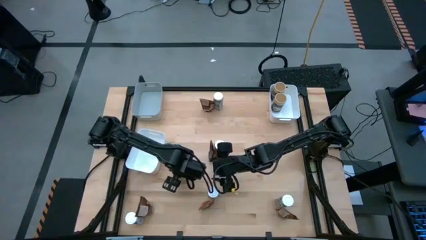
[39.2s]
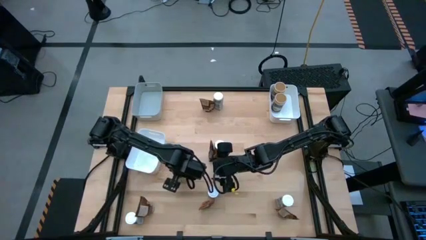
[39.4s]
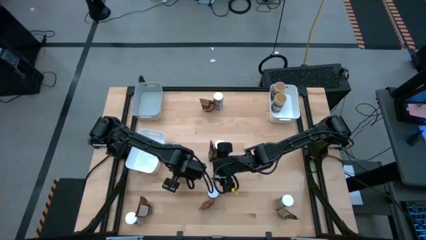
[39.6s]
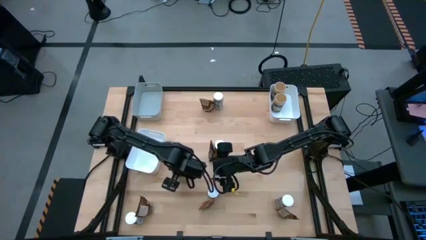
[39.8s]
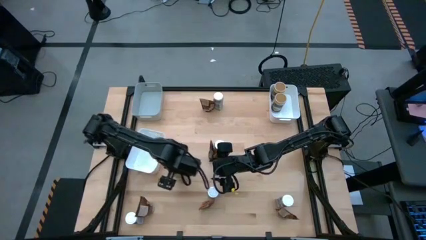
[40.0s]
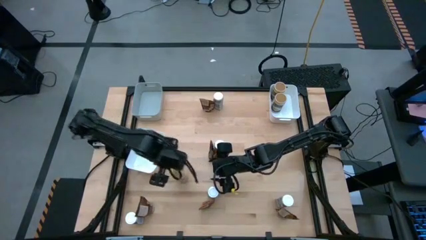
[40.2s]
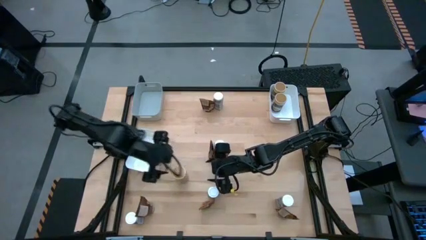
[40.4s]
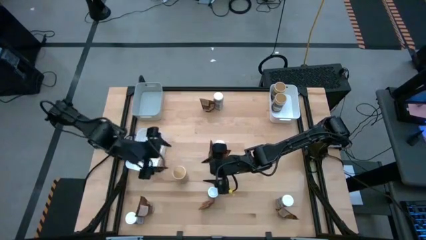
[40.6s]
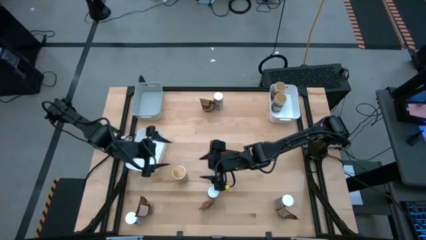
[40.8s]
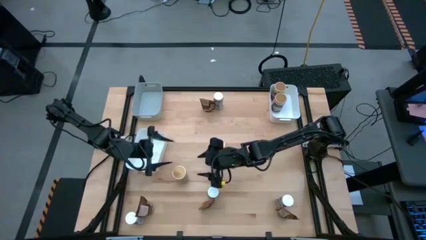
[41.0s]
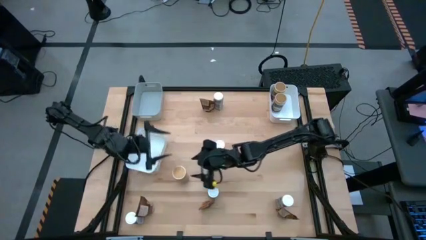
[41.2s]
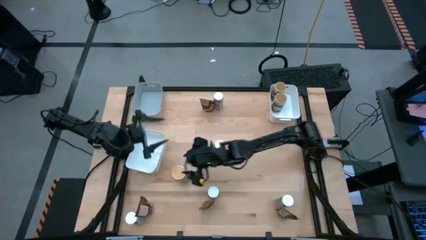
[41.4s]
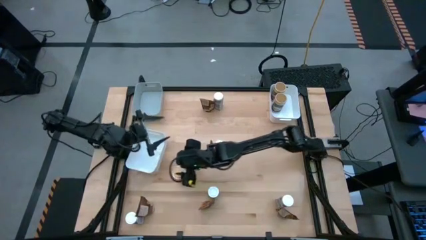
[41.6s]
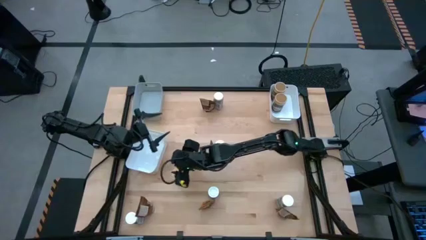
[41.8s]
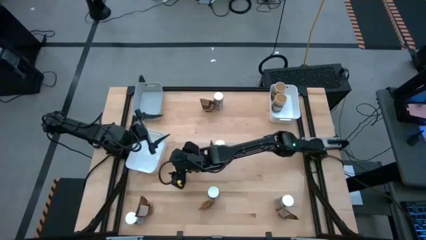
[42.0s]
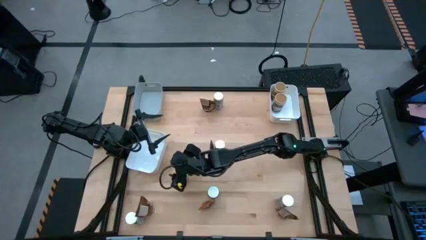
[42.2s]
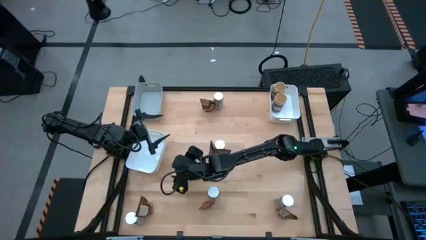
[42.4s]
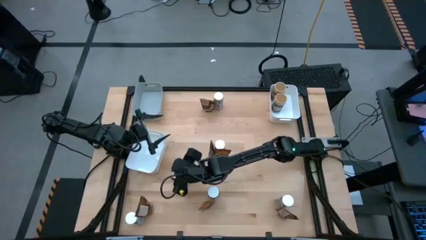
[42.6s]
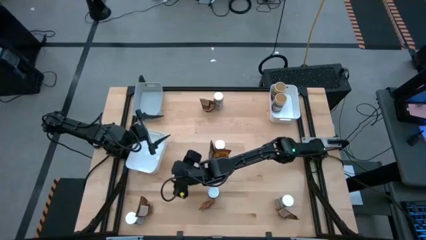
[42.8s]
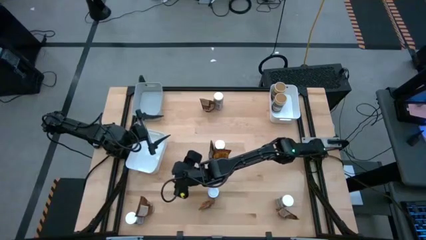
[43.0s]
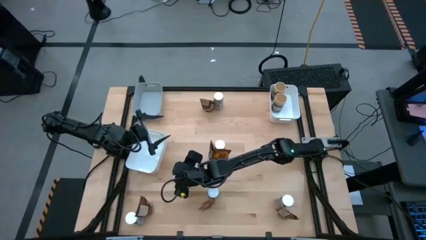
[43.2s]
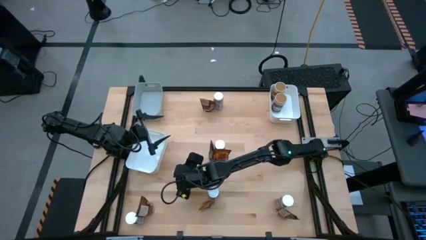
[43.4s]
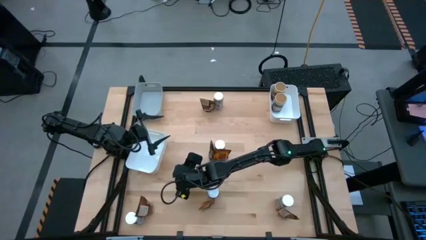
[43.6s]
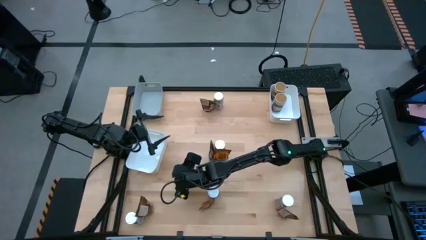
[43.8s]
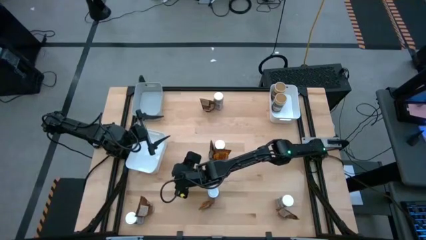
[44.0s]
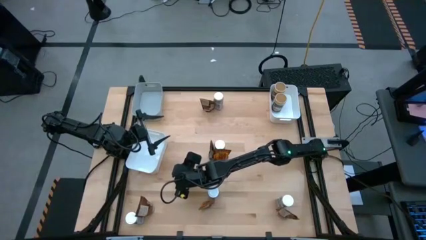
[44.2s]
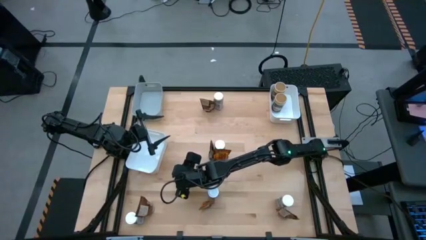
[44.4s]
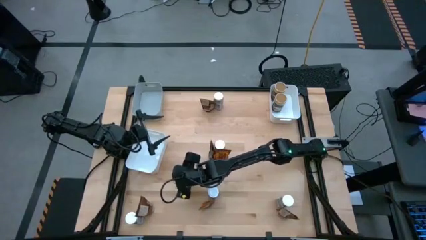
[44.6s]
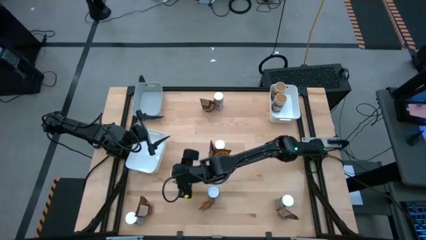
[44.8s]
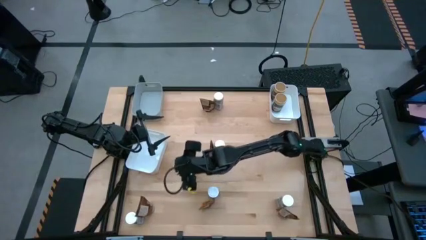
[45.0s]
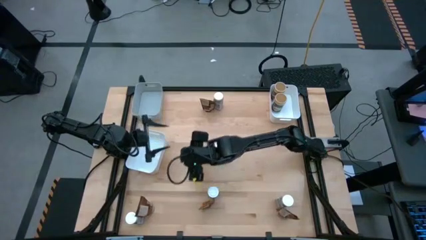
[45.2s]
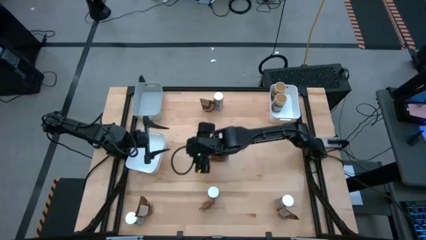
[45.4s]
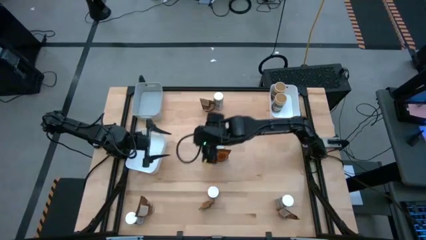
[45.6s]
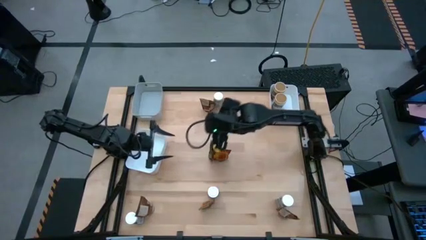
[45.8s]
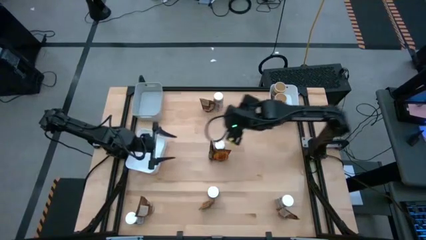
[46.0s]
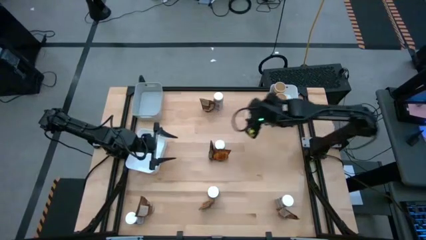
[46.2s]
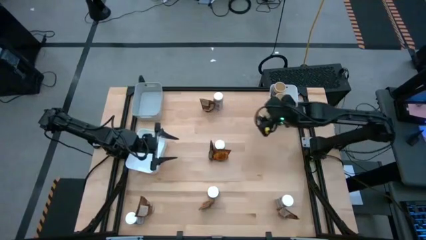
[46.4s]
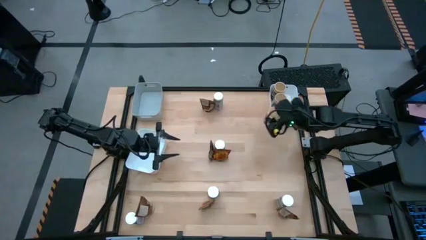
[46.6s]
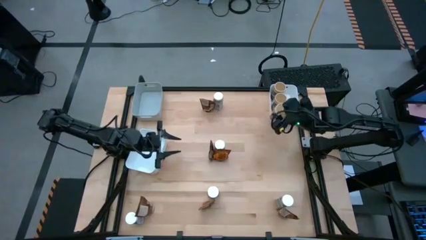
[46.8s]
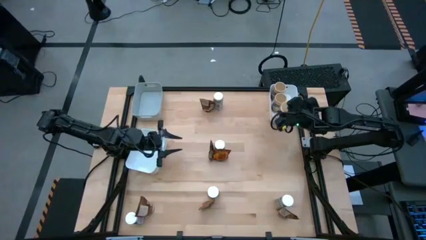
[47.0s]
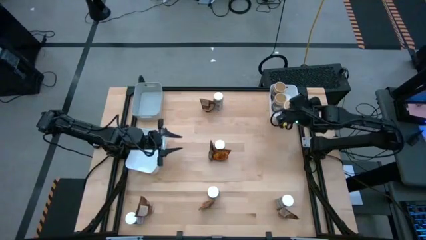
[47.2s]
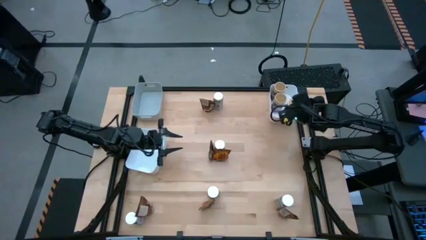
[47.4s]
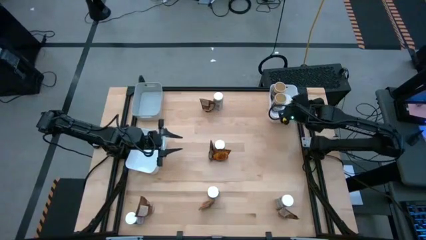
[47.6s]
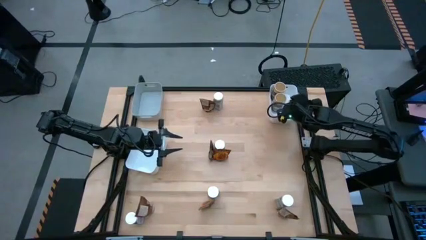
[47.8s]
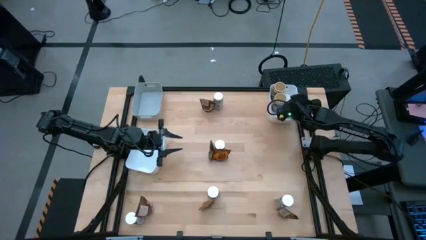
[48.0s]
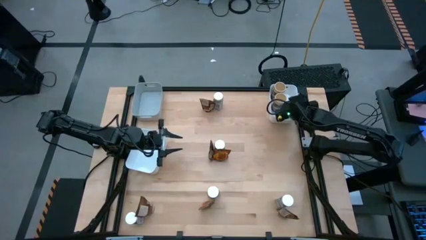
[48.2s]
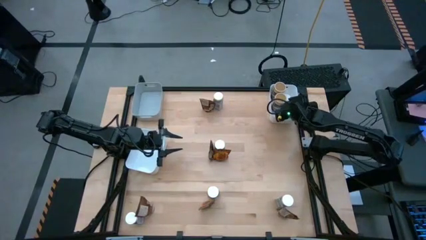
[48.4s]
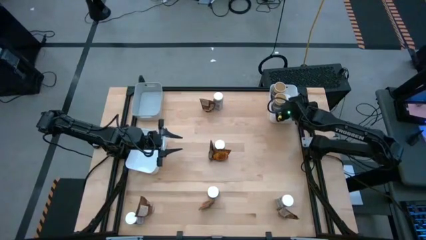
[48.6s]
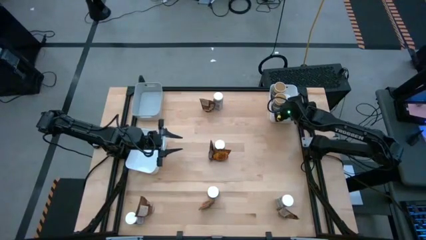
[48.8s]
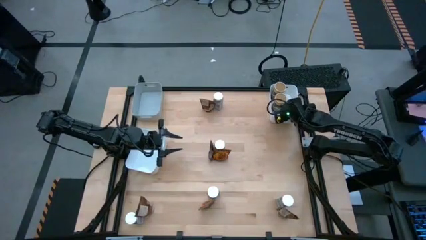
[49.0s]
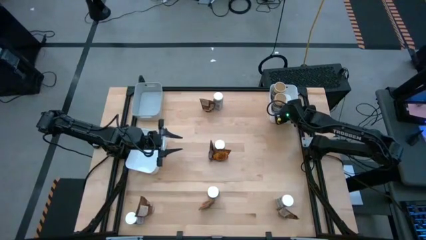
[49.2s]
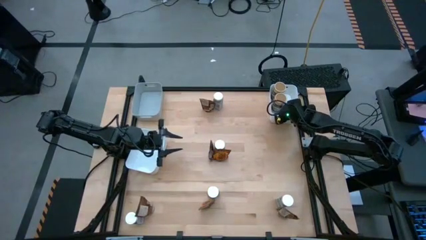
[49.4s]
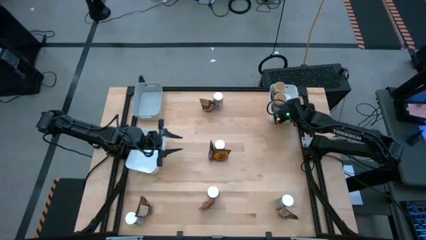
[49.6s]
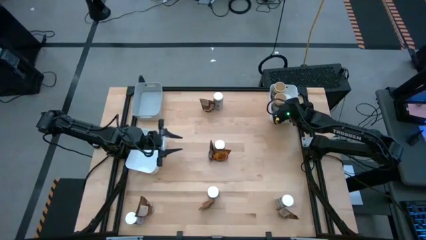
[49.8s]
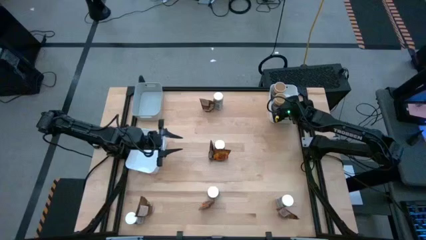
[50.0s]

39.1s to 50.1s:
Task: Sort spices by type
Put the gold seasoning bottle into the right white bin
